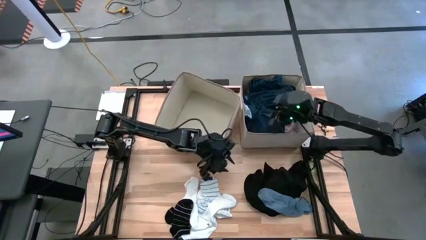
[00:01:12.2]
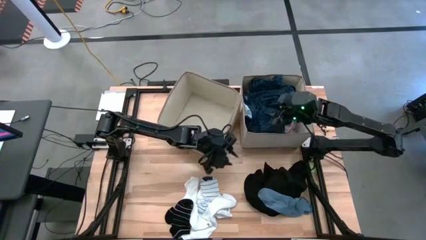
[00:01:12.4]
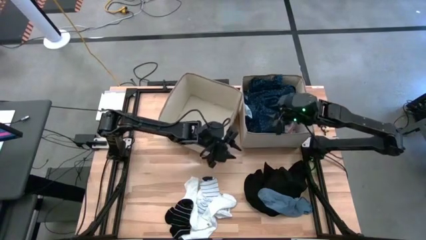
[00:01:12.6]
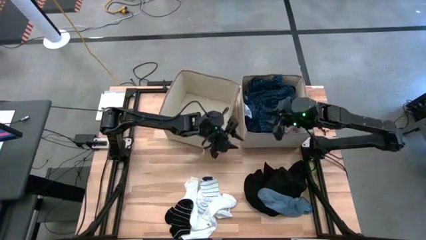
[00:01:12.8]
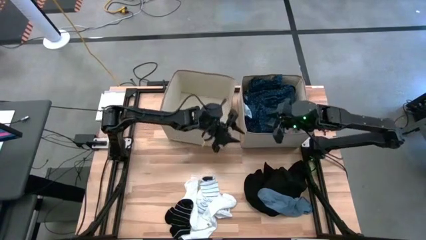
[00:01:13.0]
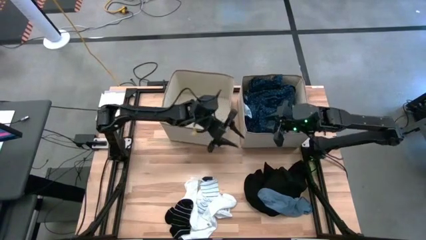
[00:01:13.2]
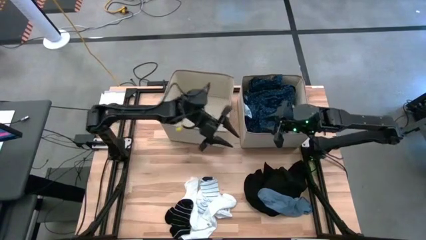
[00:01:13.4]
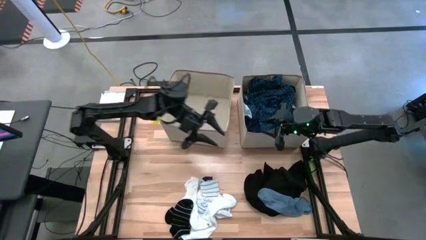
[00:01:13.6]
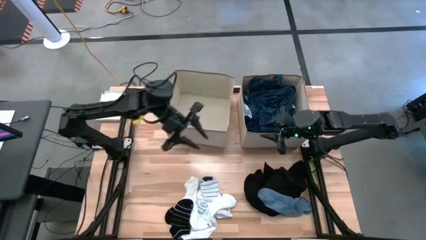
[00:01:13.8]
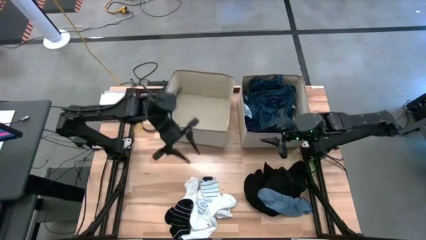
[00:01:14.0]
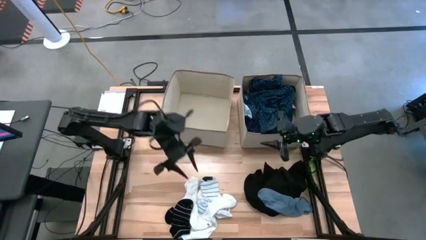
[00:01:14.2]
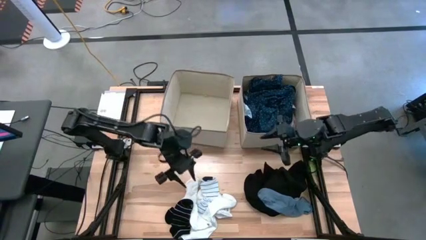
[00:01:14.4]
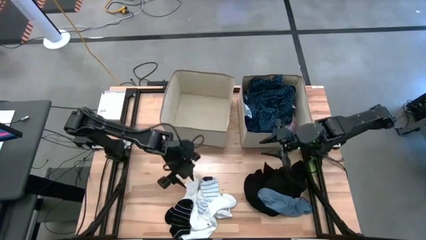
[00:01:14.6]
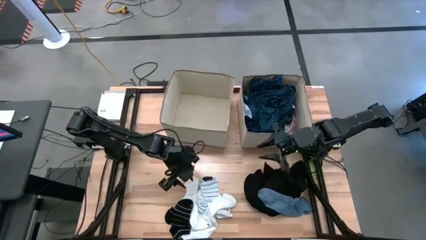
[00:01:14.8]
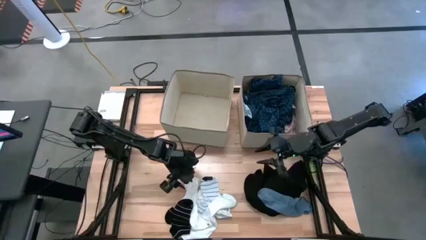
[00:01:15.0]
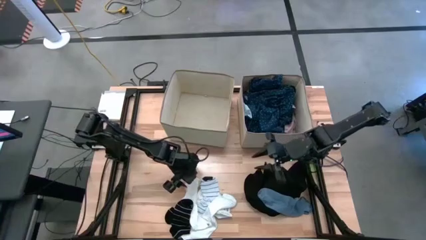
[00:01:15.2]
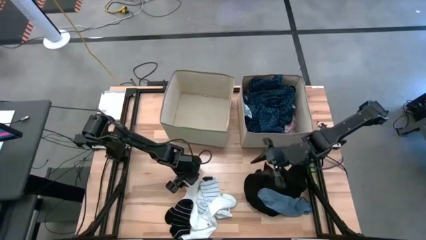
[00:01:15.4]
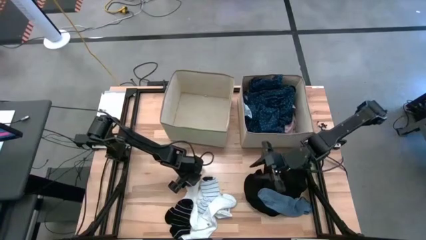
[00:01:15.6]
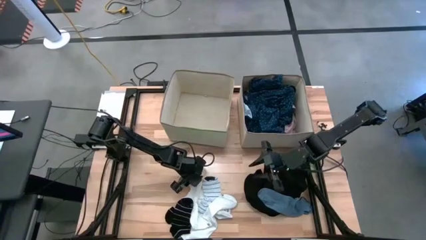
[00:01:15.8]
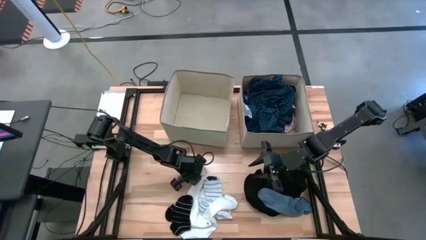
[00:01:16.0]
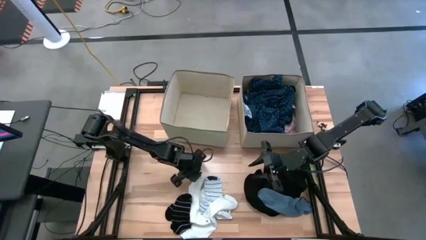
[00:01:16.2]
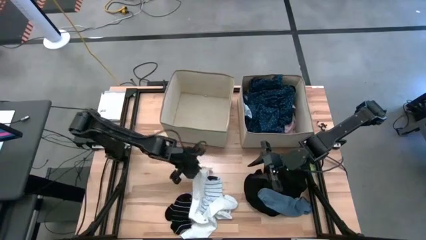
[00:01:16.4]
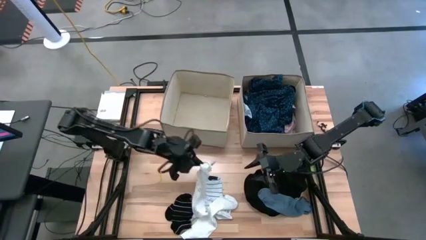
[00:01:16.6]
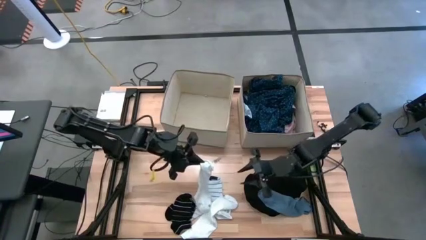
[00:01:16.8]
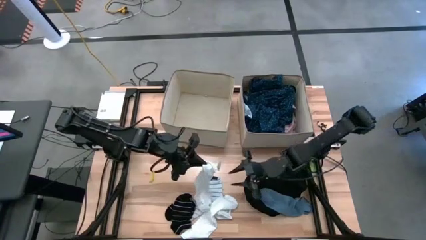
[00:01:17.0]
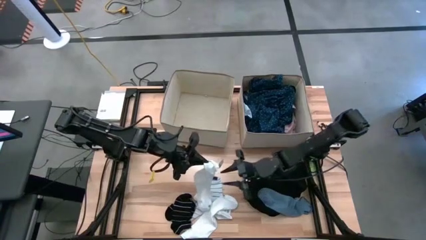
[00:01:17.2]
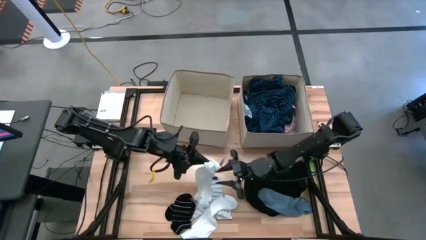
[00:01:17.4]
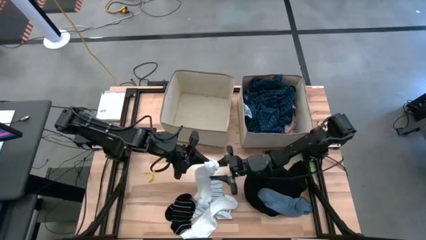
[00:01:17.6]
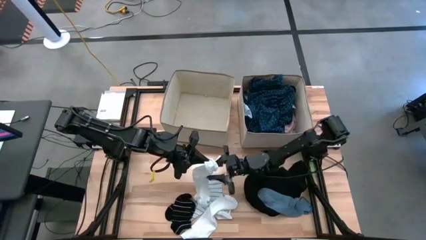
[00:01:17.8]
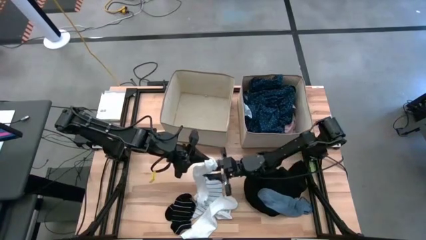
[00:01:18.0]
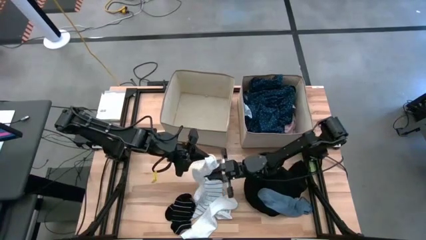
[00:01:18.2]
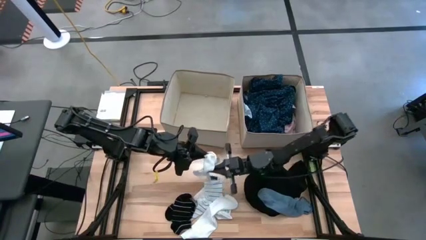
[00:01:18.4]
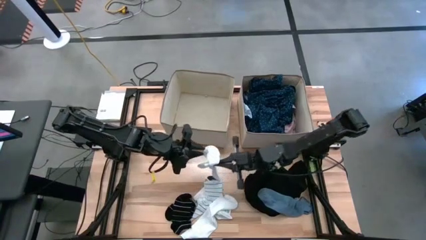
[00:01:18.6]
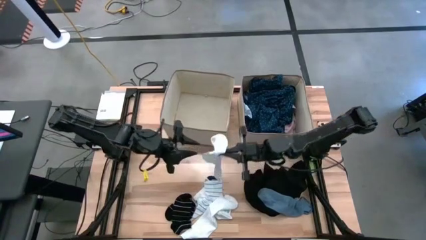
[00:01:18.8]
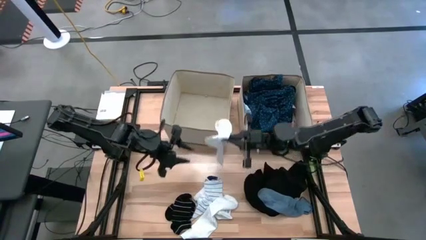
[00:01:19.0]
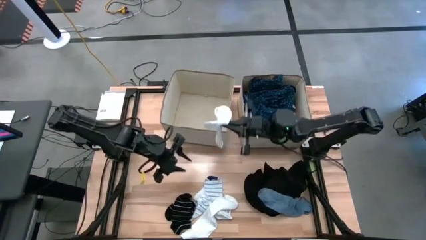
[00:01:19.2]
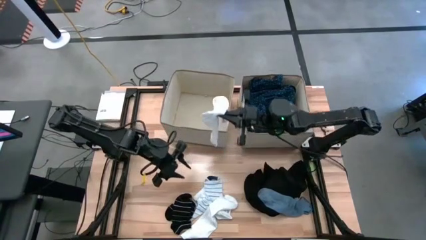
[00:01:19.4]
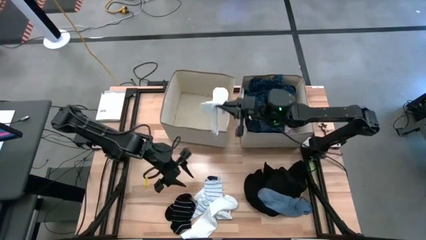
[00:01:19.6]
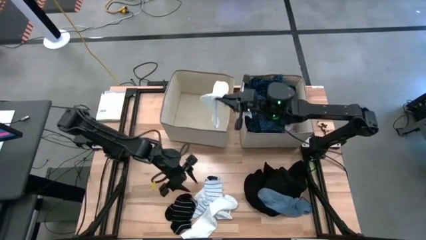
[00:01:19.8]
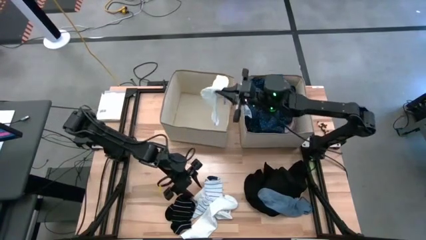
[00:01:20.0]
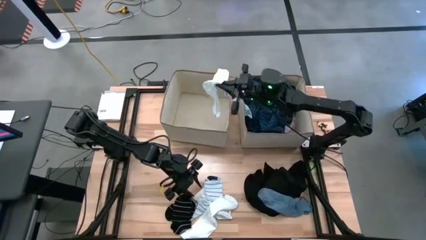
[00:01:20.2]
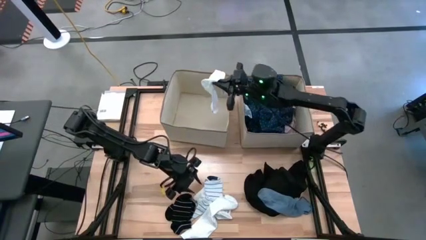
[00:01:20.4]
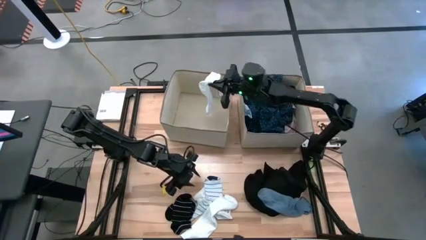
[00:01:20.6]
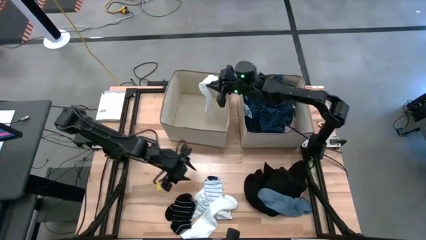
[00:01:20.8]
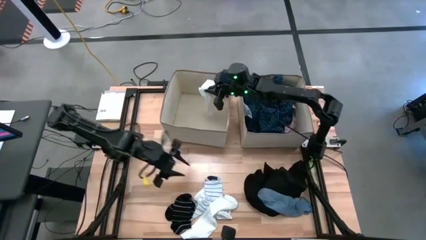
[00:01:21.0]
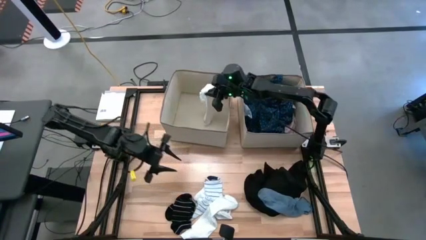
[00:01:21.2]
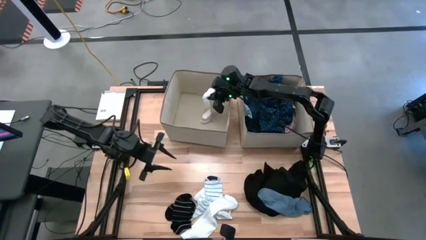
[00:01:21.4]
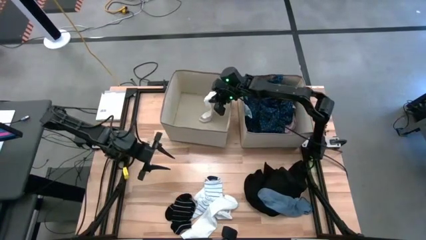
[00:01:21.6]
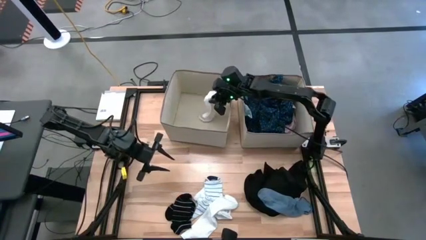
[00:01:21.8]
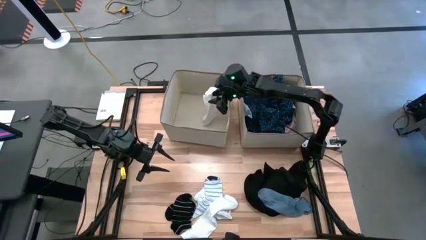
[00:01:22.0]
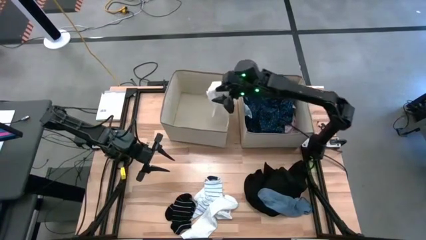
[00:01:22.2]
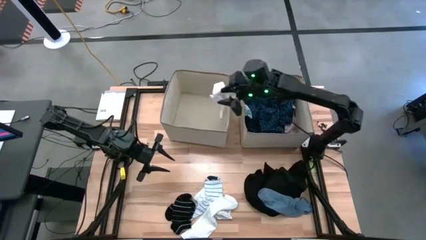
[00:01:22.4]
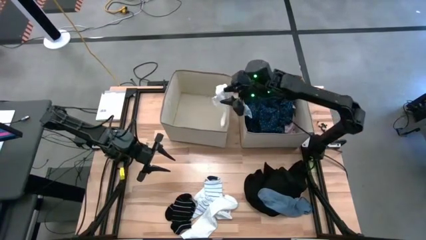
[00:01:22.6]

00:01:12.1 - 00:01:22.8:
Task: Sort clothes
Put the white sock into the left laundry organizer

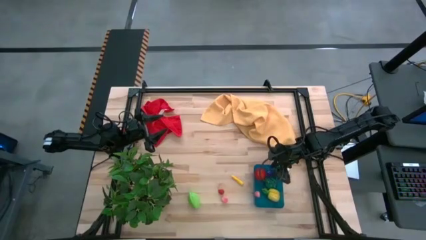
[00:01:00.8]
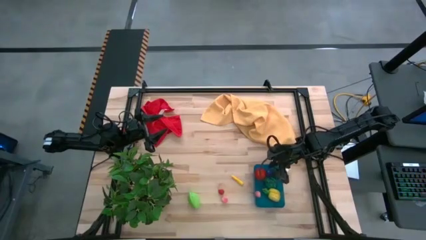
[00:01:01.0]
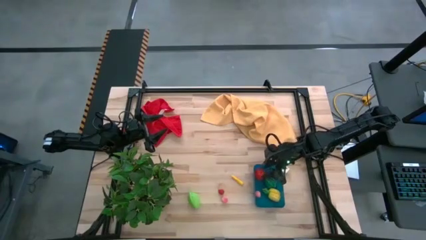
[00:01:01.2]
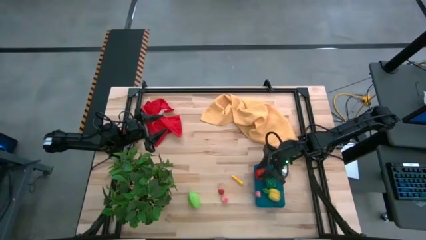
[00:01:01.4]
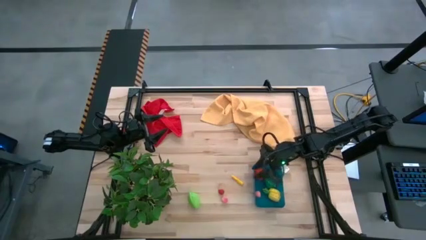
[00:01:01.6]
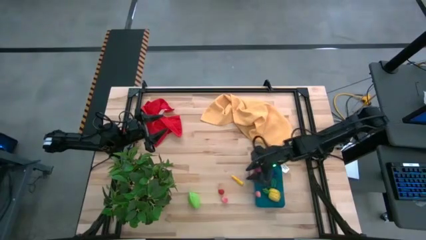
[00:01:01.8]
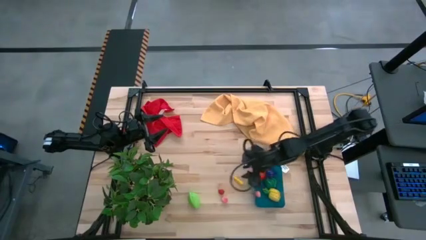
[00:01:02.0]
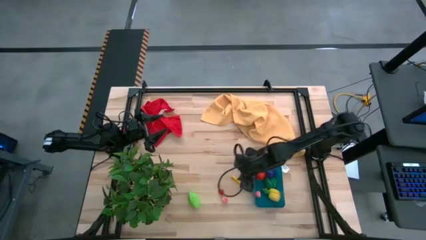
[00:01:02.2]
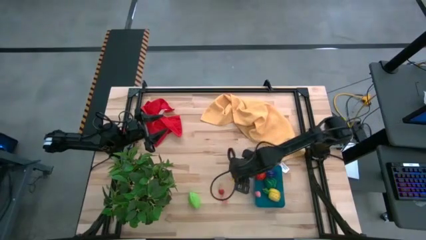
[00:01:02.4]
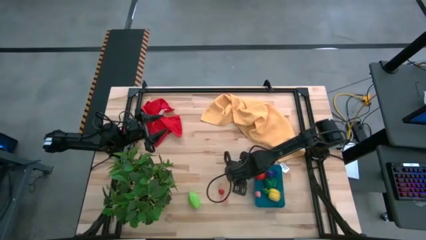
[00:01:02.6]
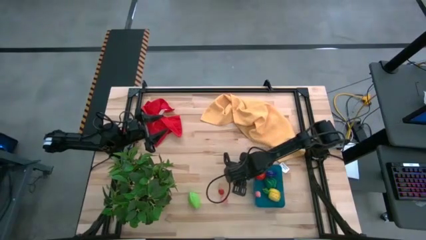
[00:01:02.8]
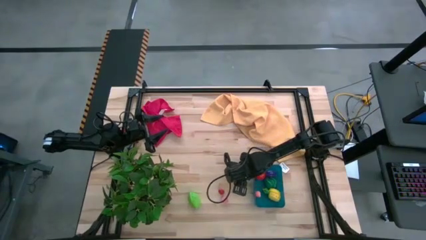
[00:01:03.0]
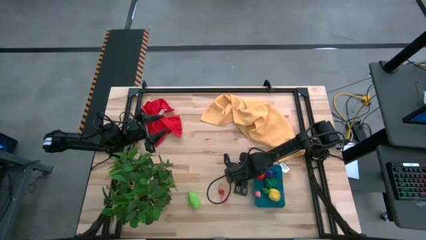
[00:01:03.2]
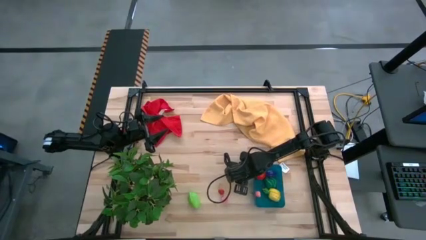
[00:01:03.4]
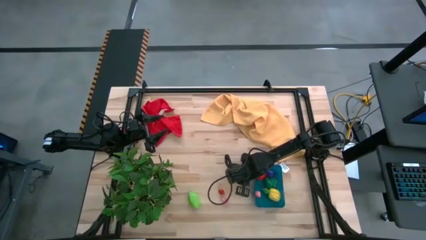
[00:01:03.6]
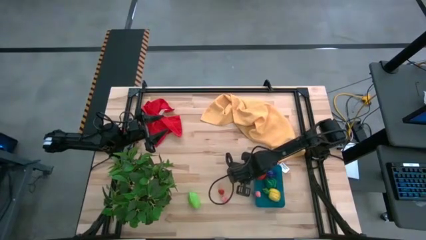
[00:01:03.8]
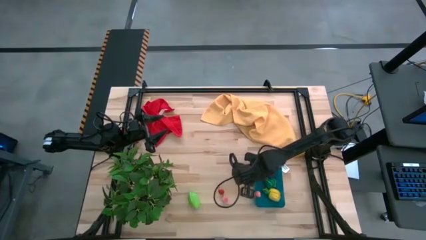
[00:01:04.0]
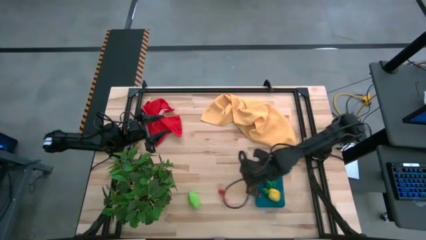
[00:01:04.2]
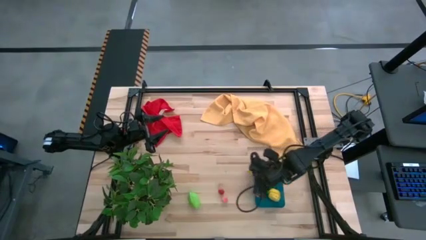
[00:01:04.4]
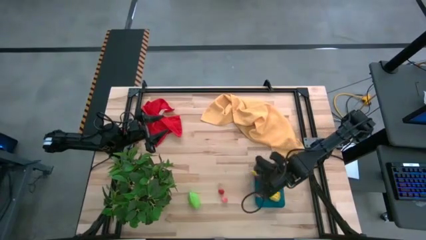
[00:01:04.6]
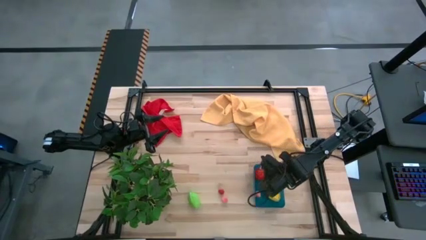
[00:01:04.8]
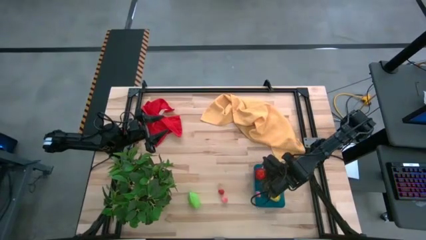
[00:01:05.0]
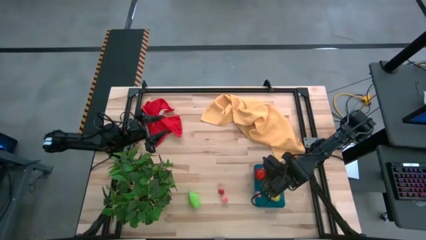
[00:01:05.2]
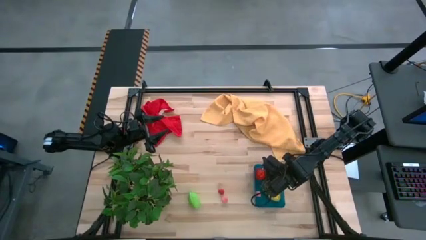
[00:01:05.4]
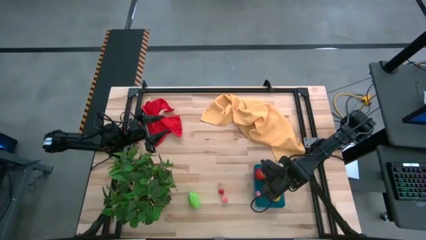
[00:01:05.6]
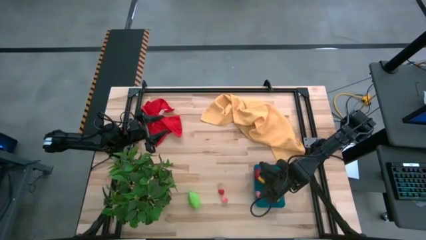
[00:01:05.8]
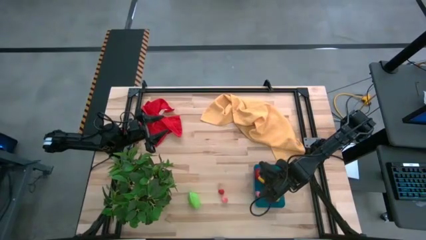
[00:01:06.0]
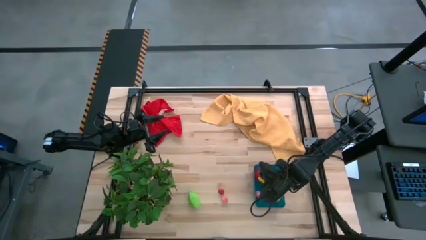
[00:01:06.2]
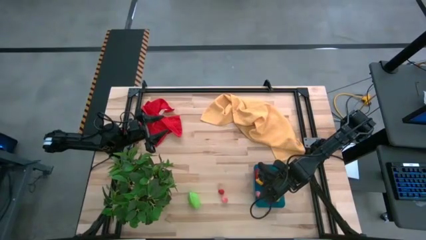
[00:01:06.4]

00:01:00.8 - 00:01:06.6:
Task: Pick and placing Produce into tupperware
Put the yellow corn into the blue bin
